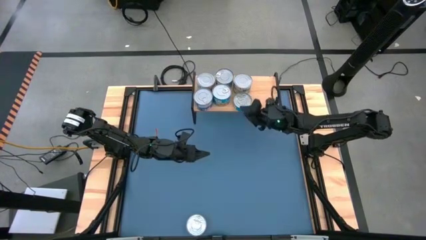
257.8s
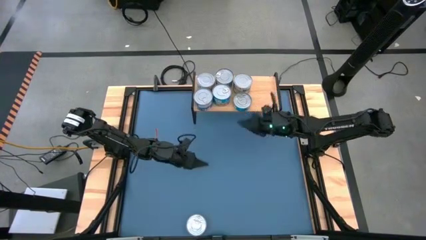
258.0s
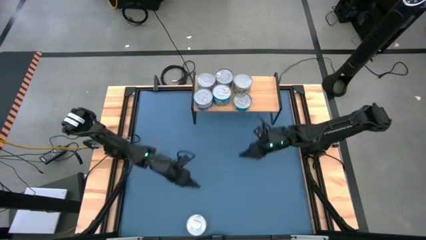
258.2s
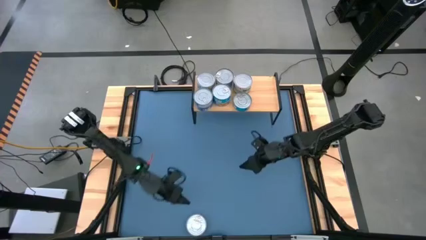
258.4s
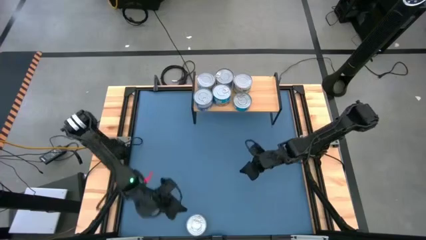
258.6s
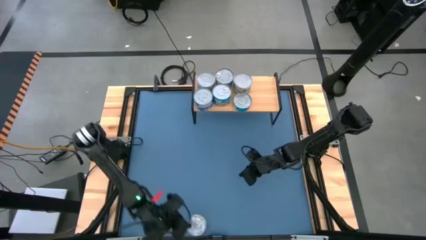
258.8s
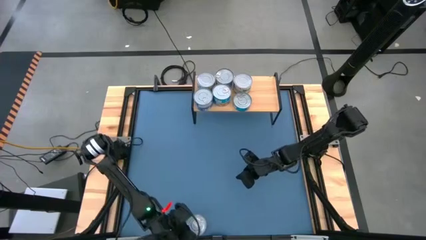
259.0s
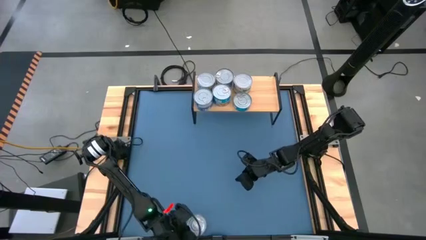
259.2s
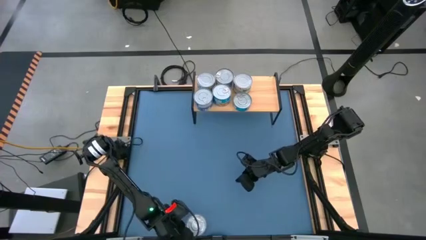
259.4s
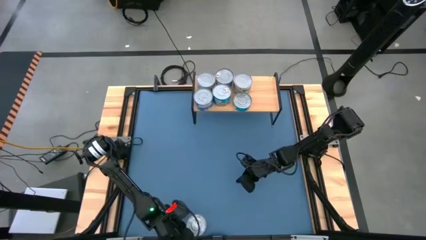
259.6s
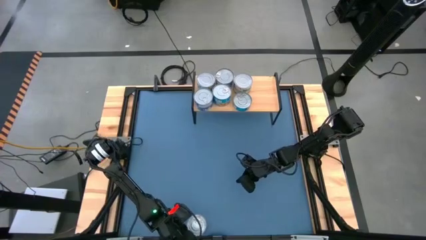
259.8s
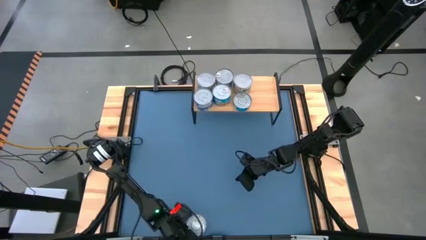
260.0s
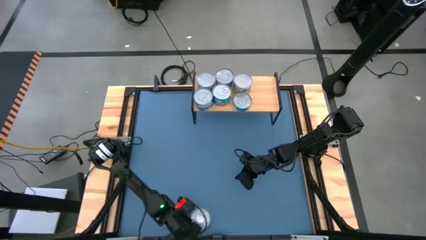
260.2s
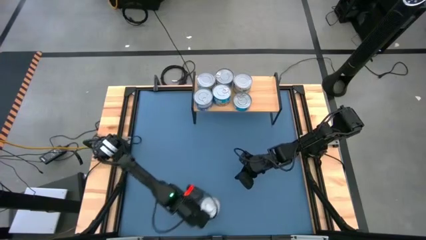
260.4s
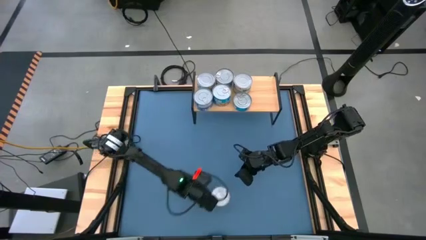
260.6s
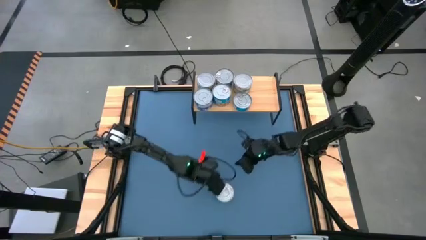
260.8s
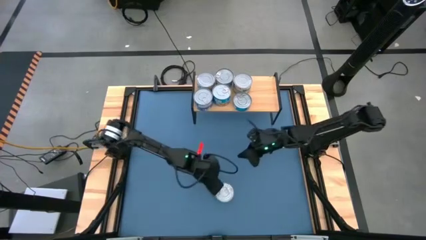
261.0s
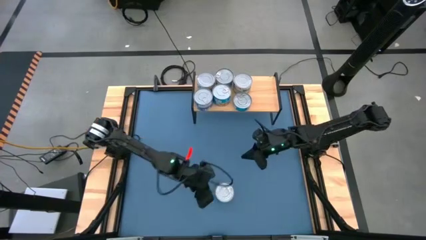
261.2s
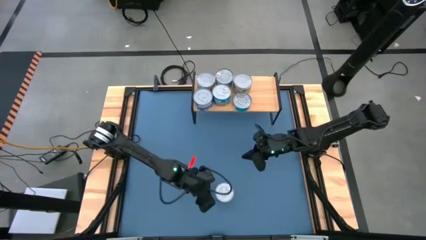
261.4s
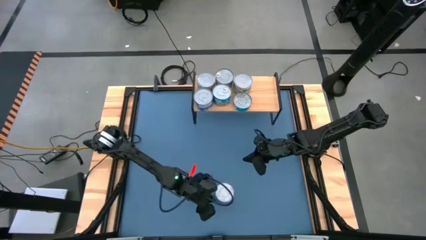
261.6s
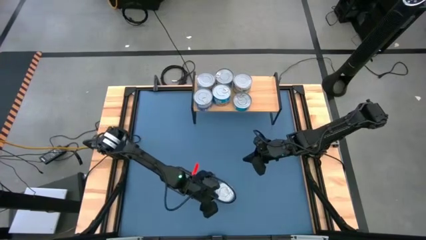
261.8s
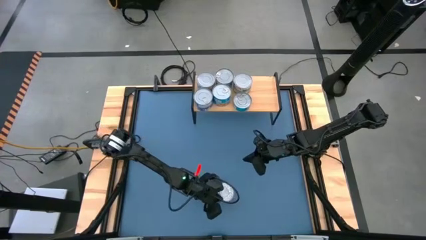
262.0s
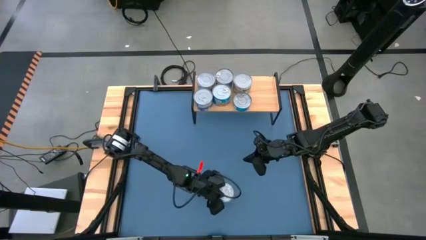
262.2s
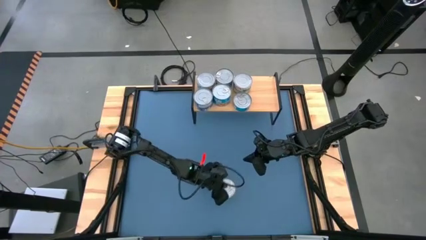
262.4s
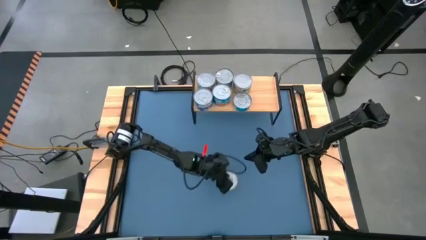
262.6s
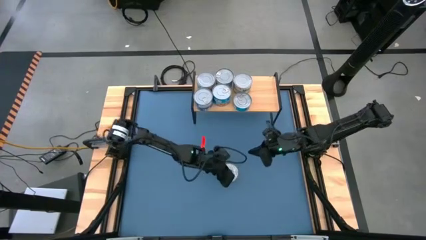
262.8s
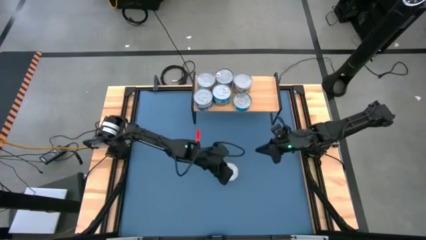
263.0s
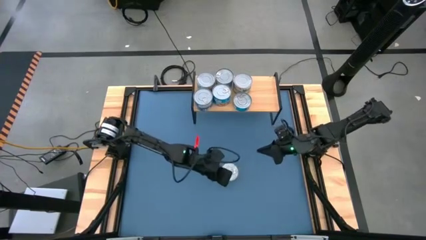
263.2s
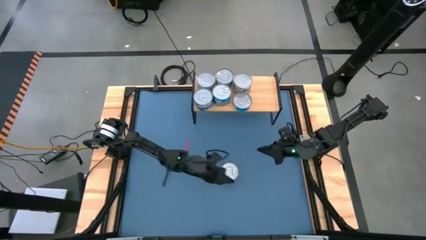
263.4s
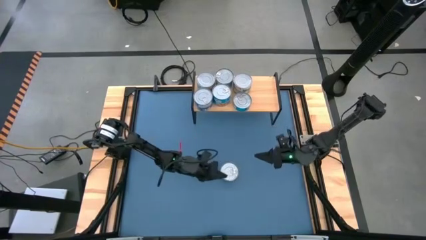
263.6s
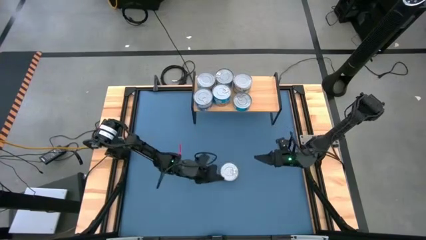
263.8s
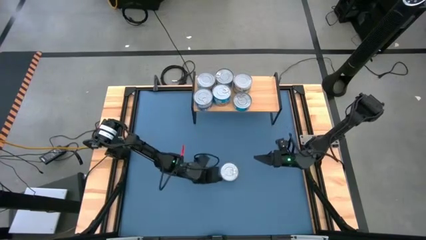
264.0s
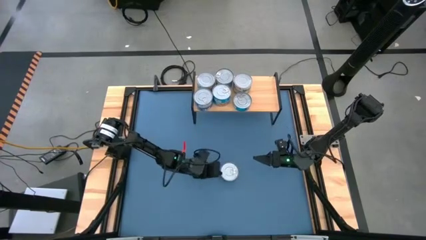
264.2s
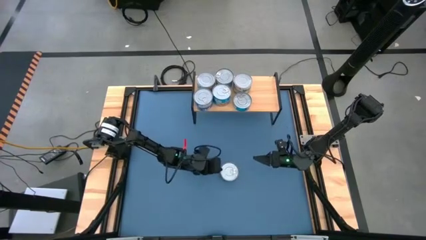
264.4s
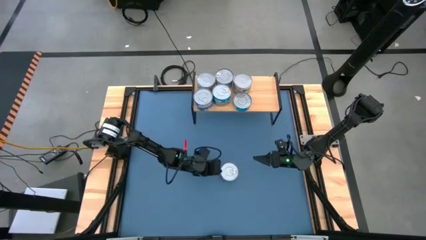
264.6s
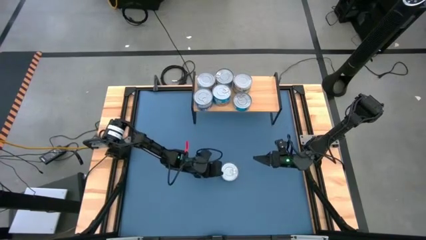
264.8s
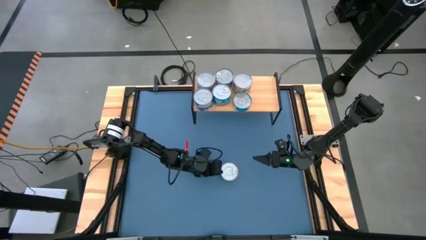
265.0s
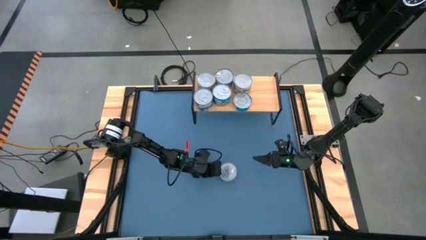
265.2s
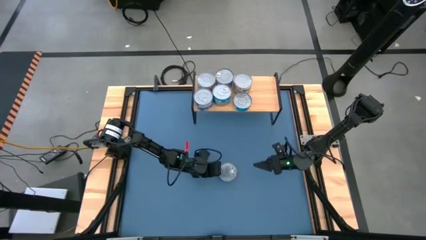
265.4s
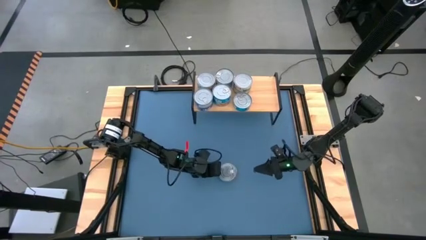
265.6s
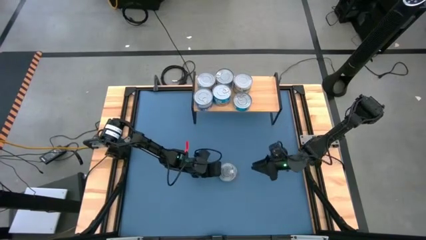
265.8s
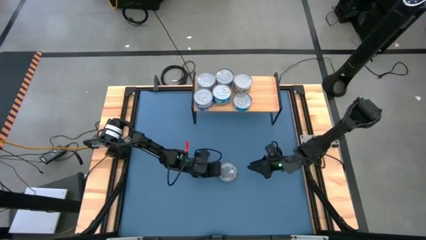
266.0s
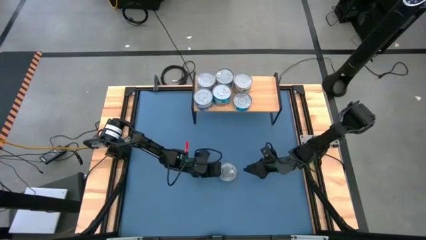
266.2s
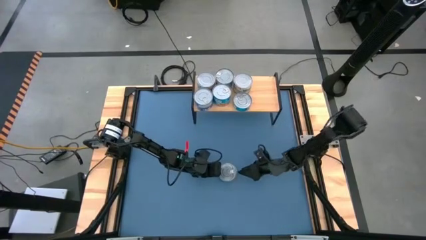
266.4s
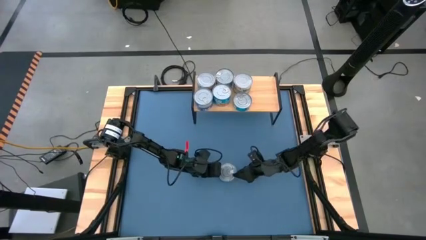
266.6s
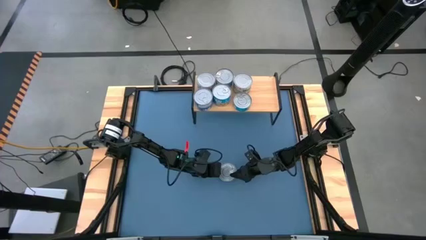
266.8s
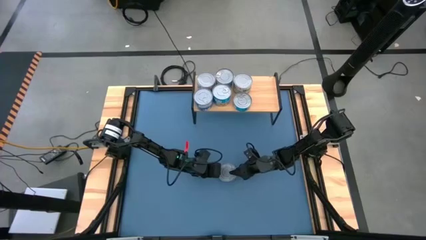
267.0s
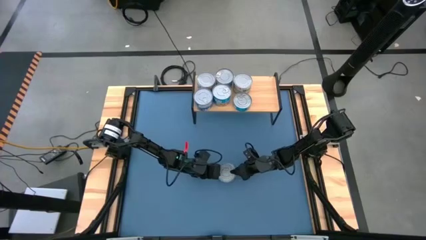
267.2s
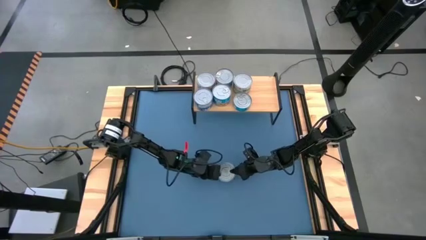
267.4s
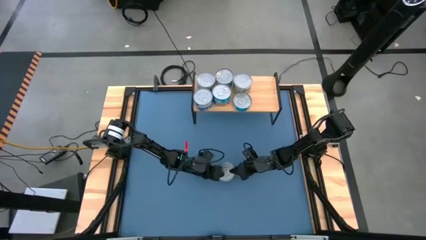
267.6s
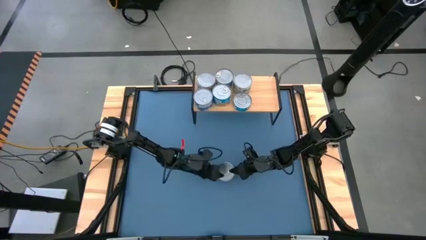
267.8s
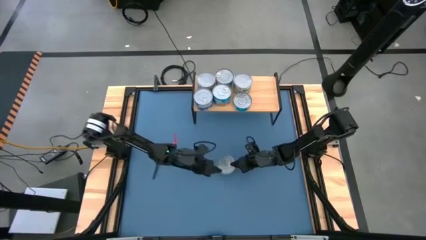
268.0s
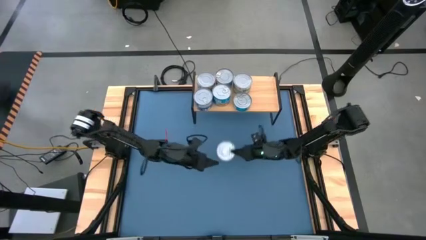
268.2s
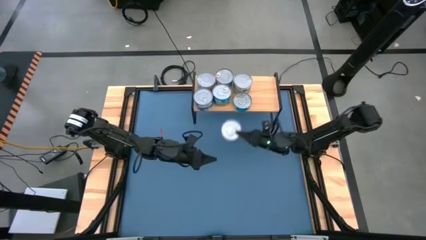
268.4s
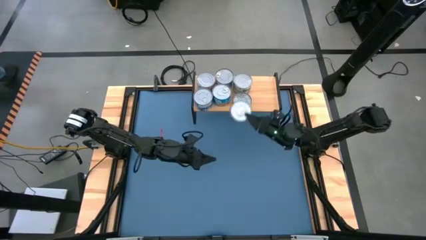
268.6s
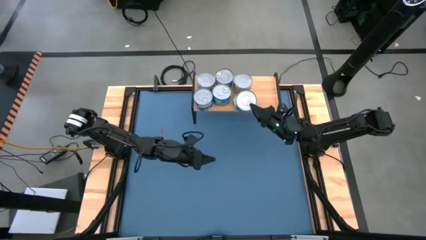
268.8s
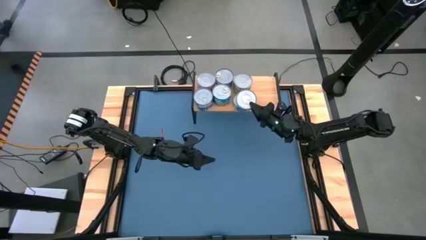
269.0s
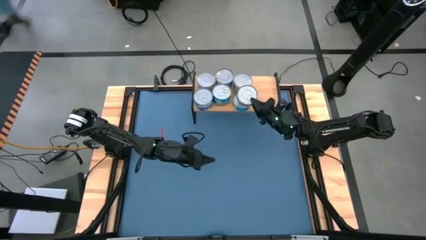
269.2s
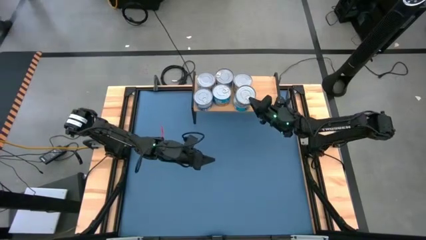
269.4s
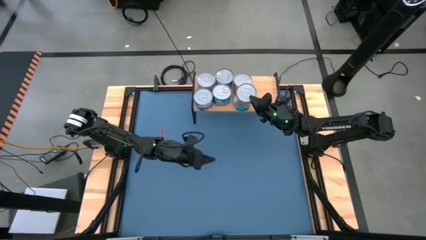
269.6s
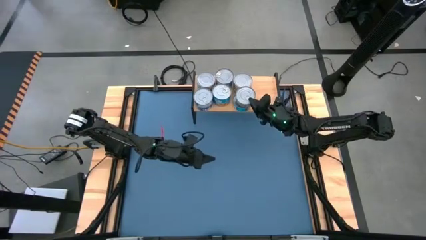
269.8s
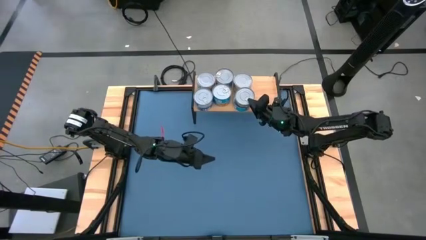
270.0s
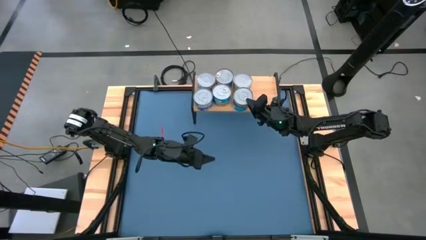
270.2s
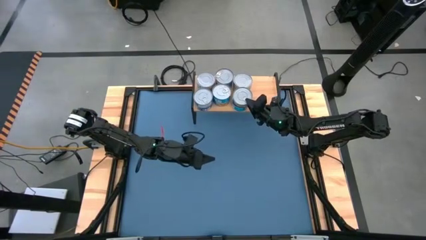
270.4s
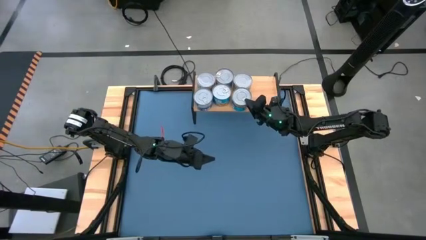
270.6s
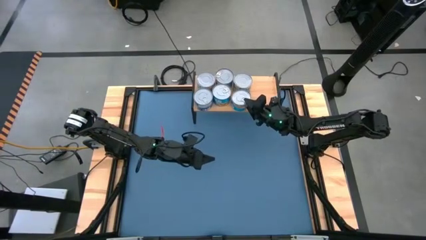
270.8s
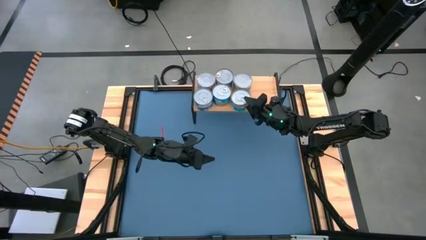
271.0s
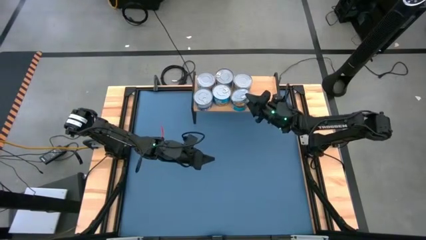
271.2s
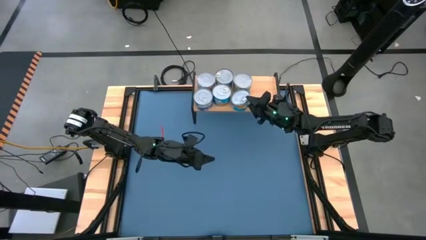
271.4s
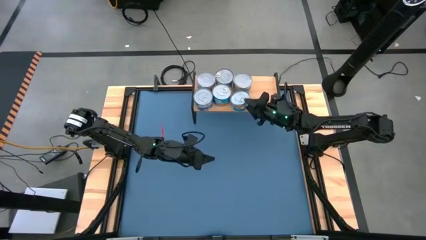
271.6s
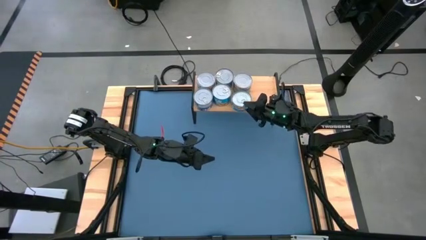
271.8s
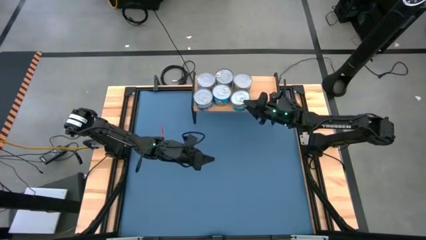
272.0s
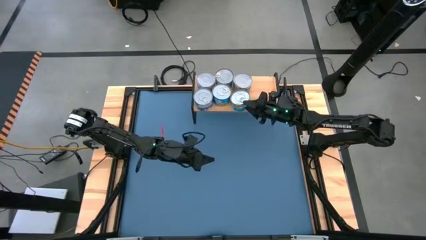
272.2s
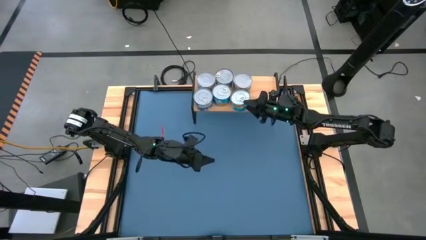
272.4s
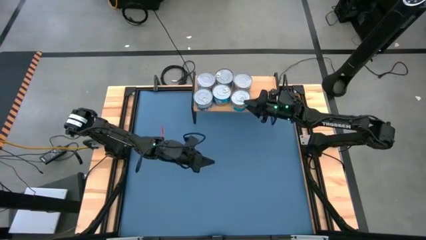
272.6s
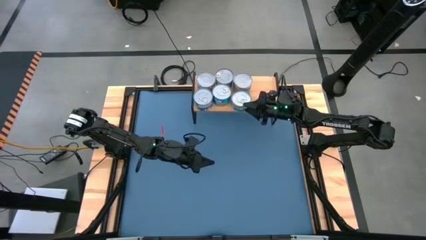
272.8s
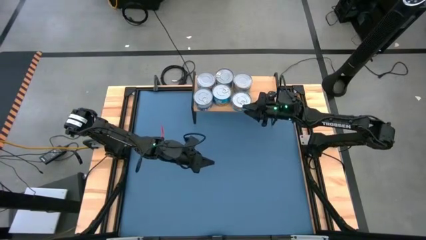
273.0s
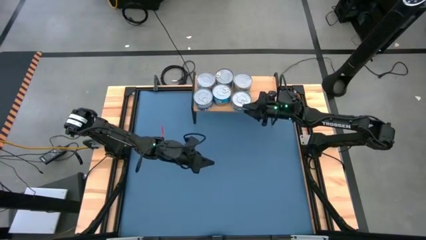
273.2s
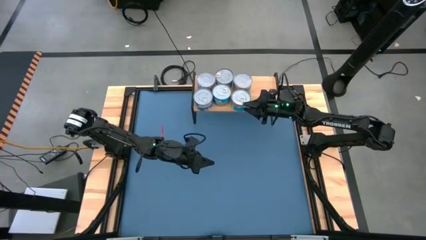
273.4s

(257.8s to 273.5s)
Task: Stack canned seafood by type on shelf
Stack the yellow blue tuna can on top of the yellow blue tuna can on the shelf

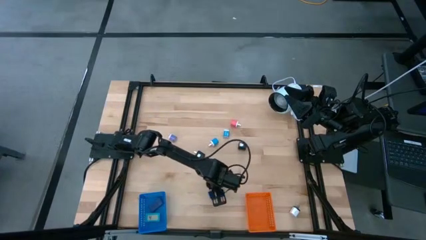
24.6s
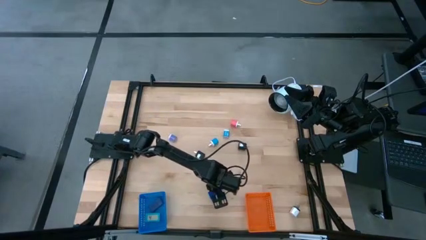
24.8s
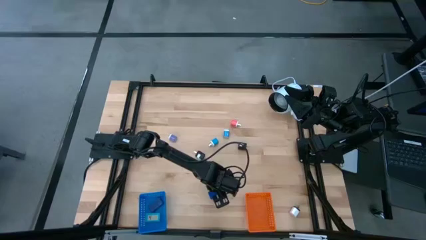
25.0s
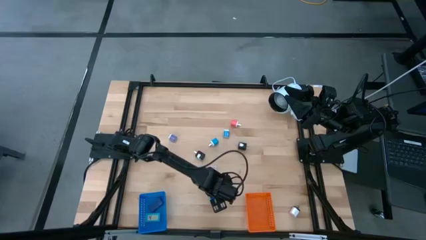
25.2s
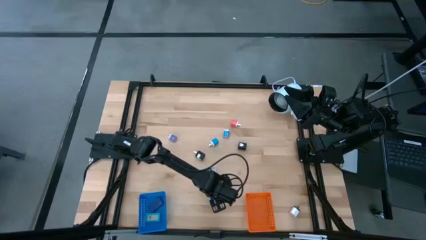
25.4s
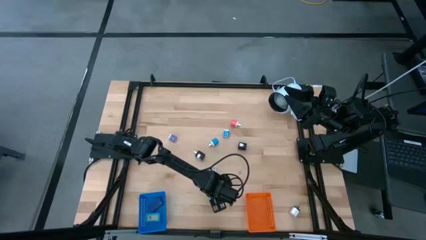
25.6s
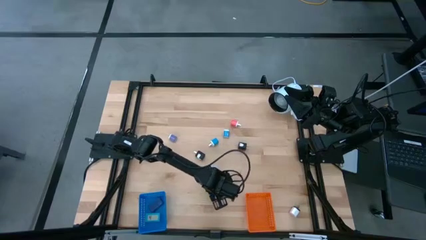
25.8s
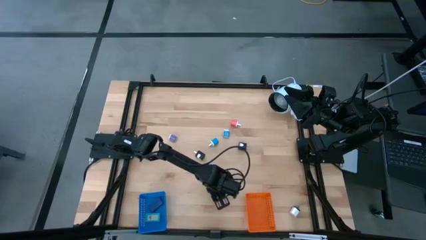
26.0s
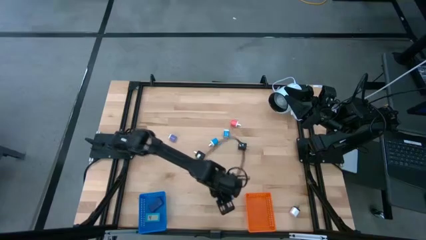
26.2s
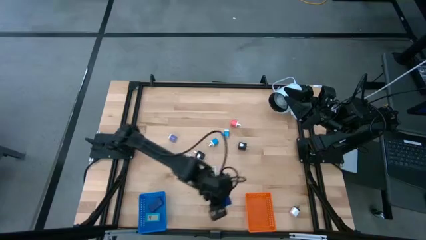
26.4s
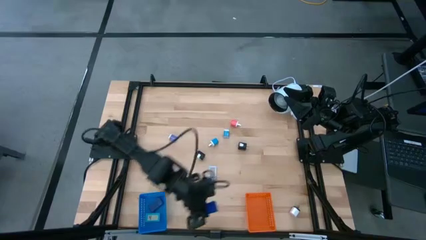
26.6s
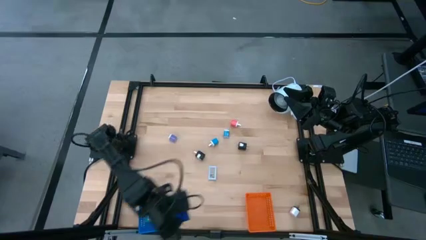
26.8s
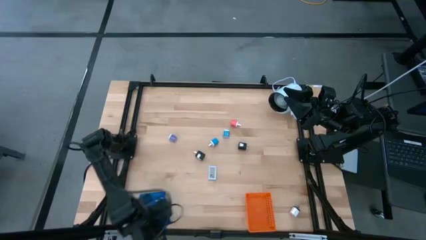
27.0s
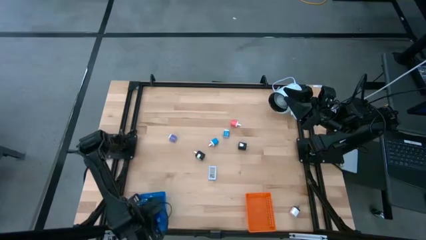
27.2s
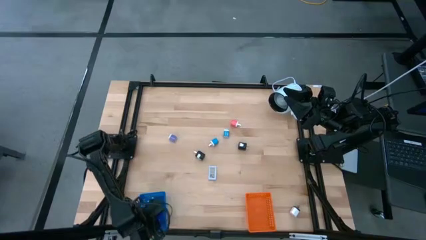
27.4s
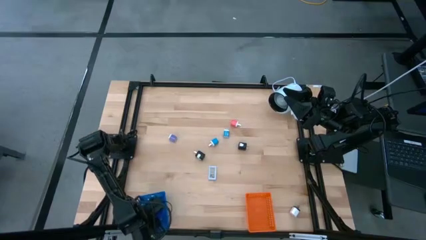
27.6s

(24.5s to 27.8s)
Task: Pick & Place Office items
Put the blue digital clock into the blue bin
